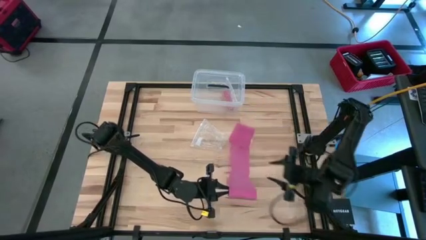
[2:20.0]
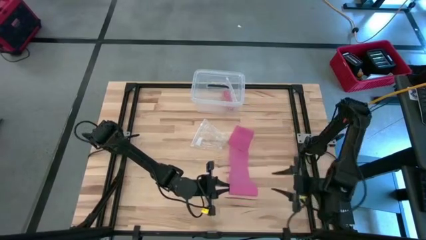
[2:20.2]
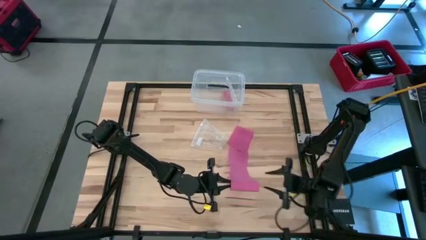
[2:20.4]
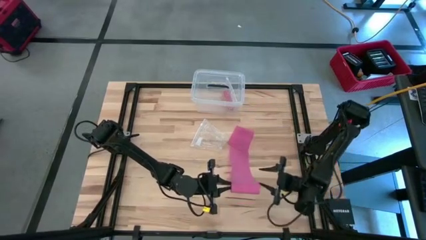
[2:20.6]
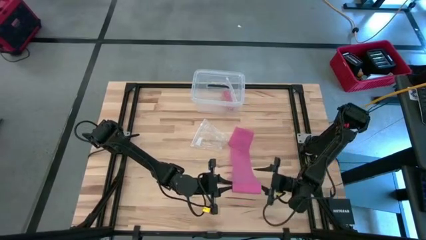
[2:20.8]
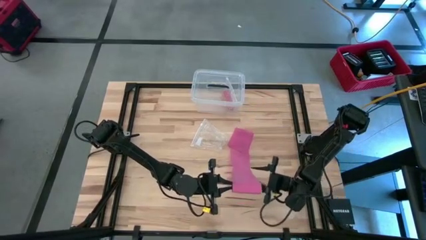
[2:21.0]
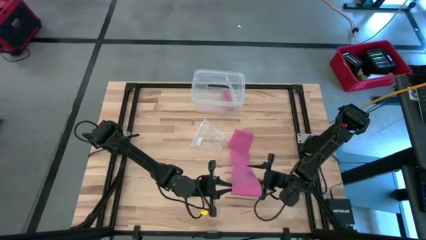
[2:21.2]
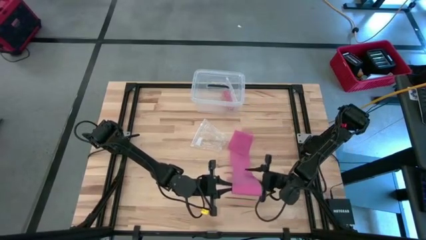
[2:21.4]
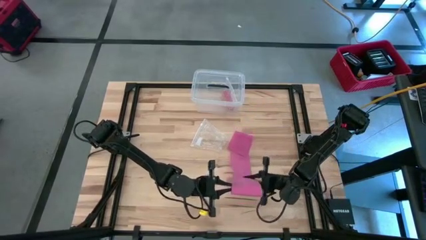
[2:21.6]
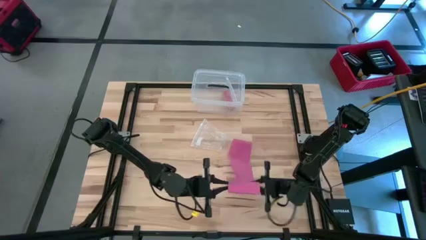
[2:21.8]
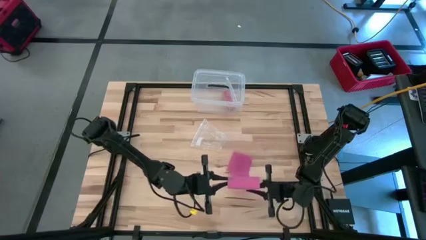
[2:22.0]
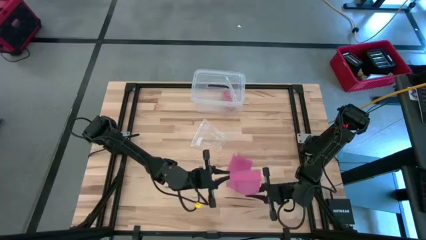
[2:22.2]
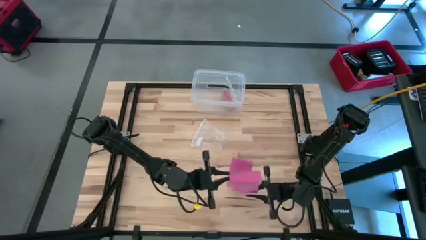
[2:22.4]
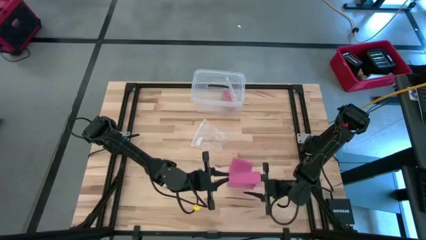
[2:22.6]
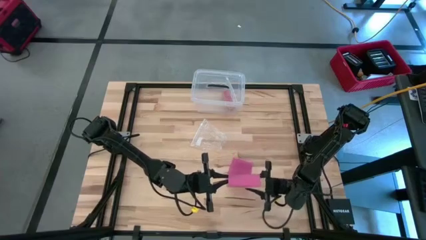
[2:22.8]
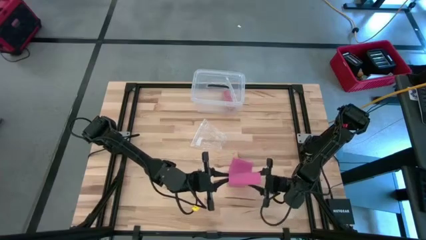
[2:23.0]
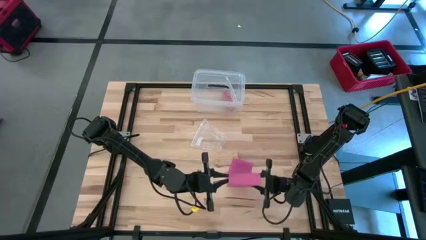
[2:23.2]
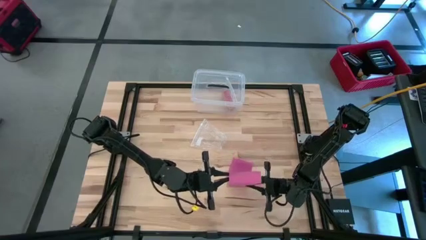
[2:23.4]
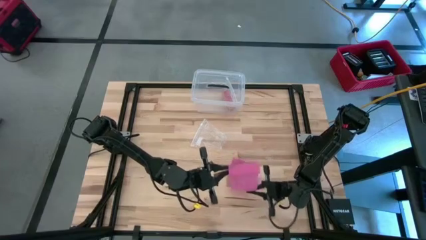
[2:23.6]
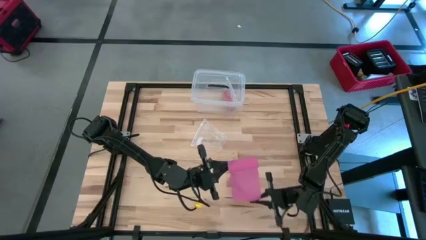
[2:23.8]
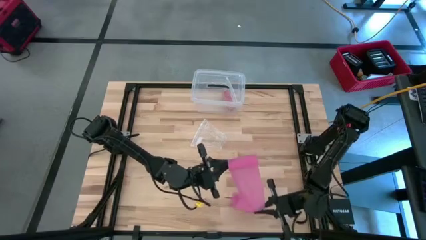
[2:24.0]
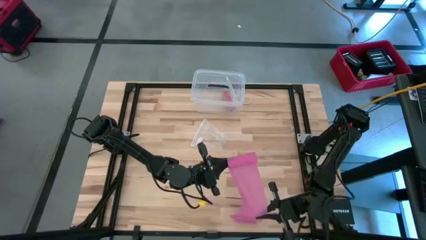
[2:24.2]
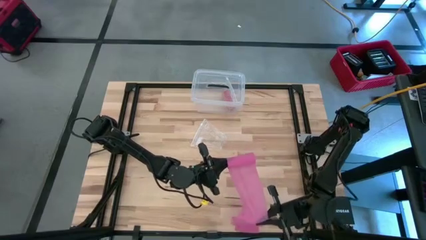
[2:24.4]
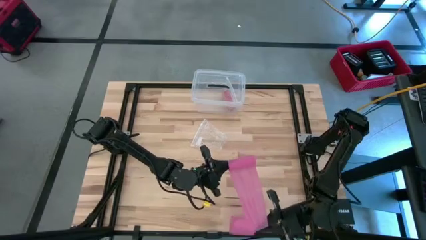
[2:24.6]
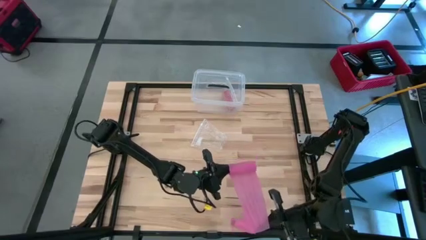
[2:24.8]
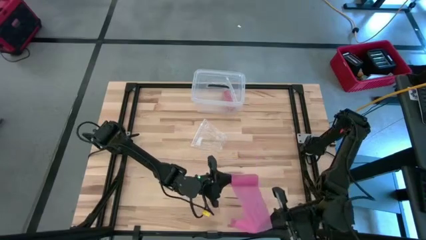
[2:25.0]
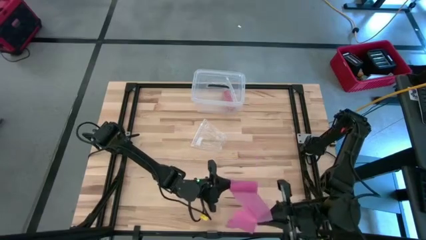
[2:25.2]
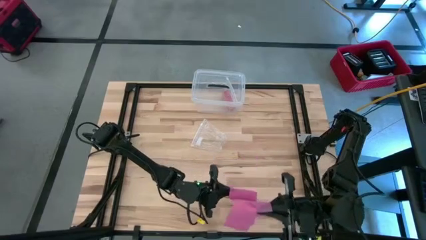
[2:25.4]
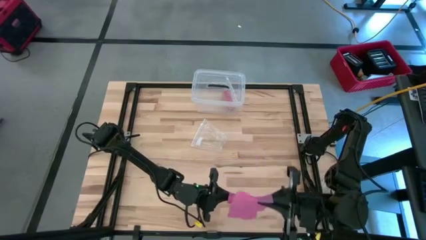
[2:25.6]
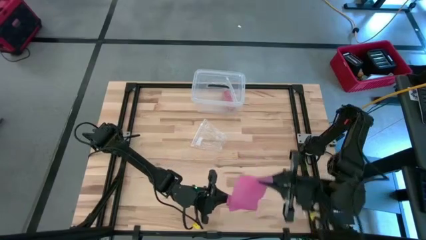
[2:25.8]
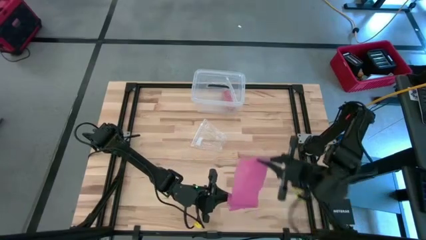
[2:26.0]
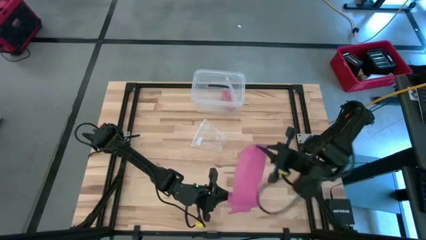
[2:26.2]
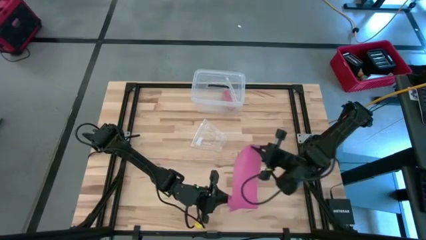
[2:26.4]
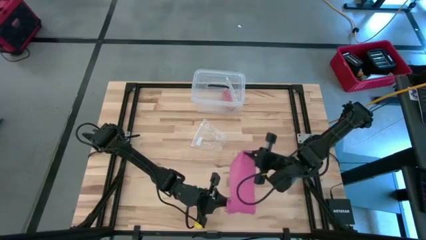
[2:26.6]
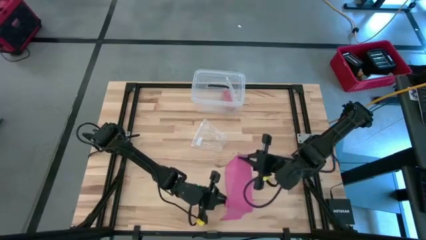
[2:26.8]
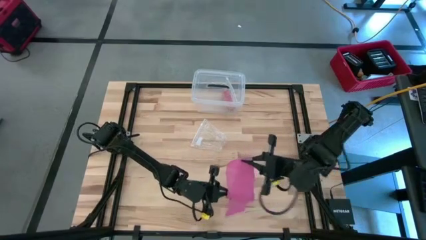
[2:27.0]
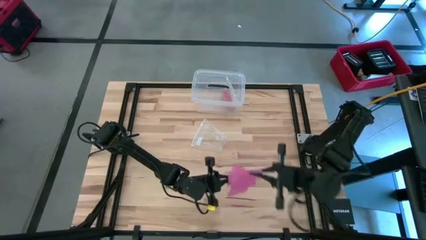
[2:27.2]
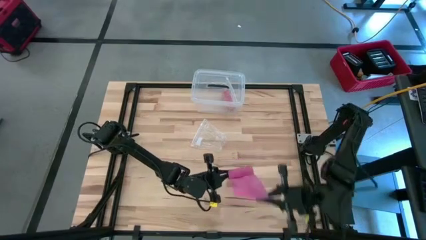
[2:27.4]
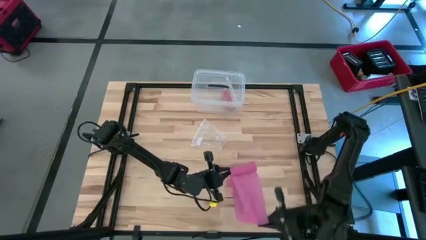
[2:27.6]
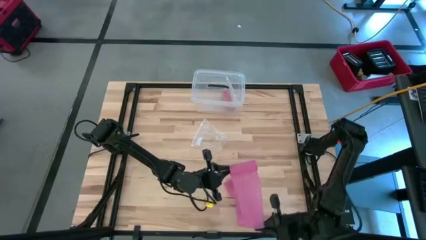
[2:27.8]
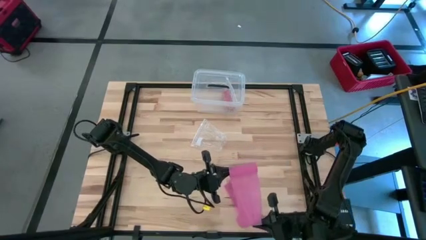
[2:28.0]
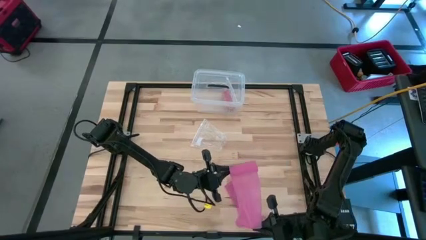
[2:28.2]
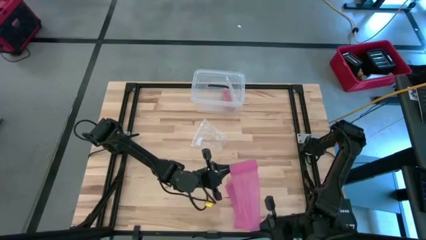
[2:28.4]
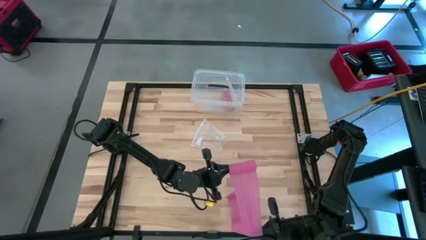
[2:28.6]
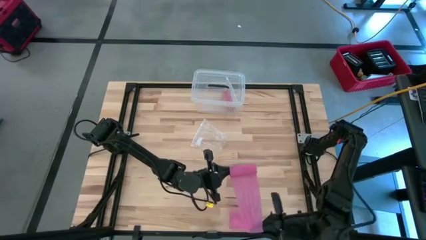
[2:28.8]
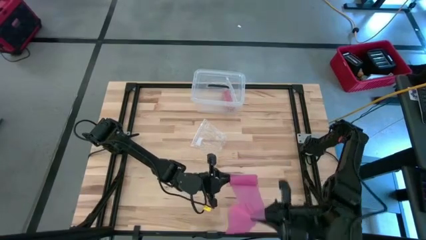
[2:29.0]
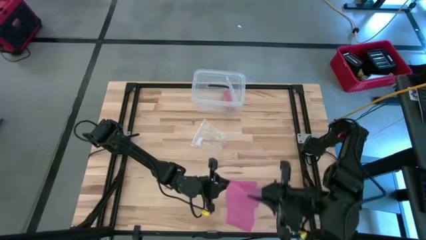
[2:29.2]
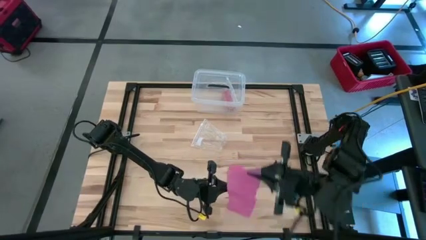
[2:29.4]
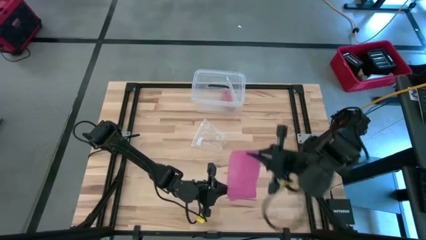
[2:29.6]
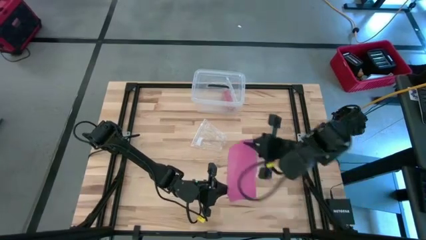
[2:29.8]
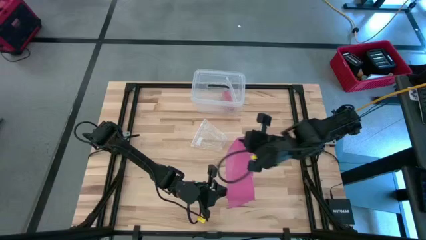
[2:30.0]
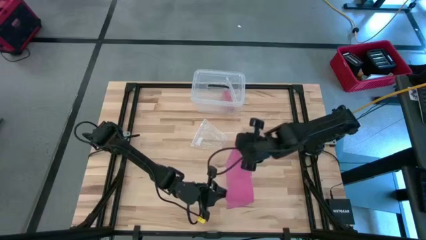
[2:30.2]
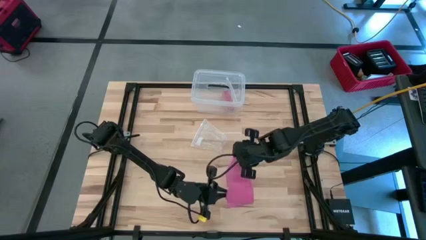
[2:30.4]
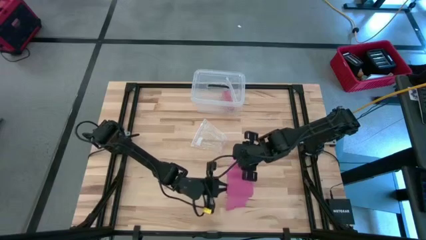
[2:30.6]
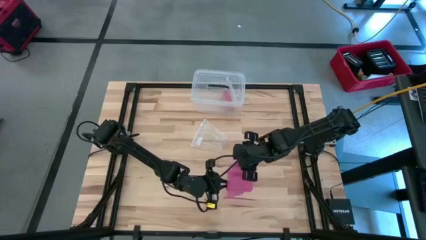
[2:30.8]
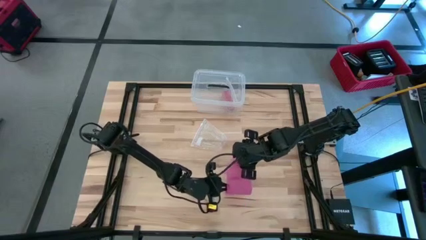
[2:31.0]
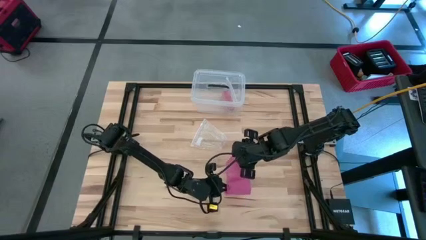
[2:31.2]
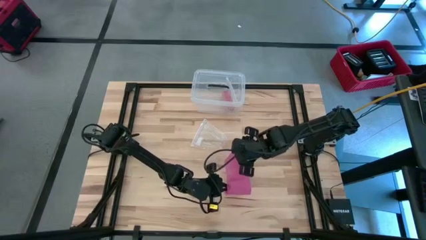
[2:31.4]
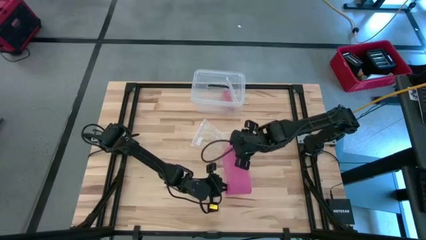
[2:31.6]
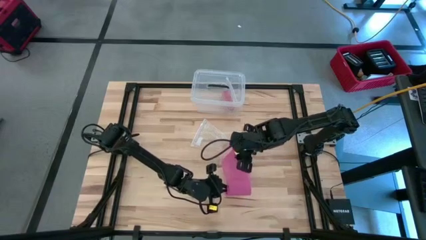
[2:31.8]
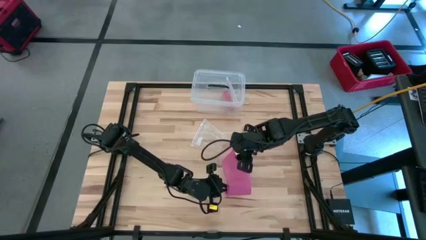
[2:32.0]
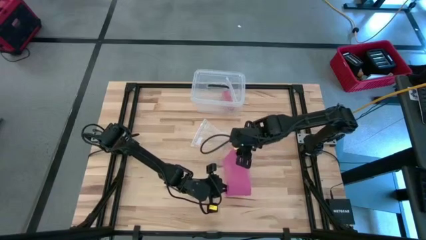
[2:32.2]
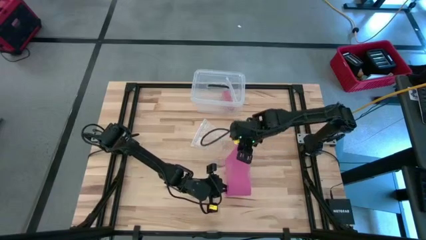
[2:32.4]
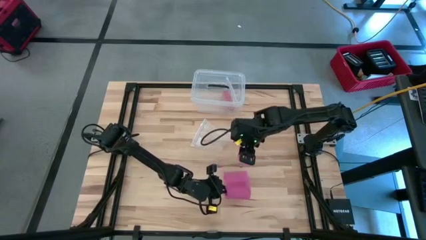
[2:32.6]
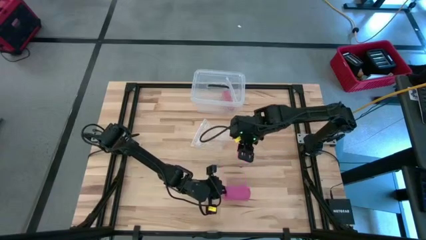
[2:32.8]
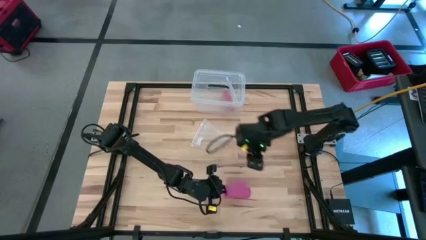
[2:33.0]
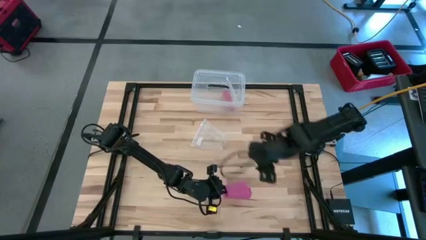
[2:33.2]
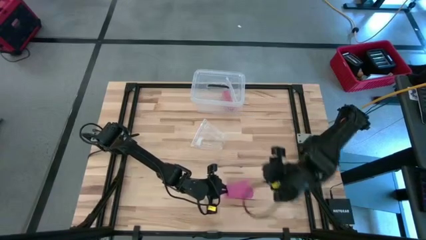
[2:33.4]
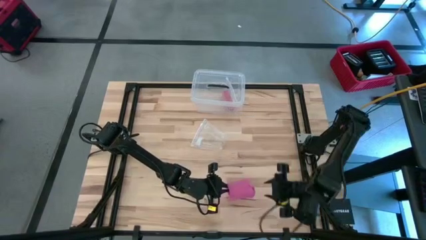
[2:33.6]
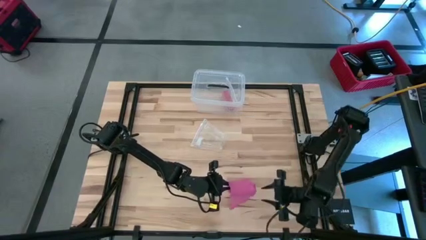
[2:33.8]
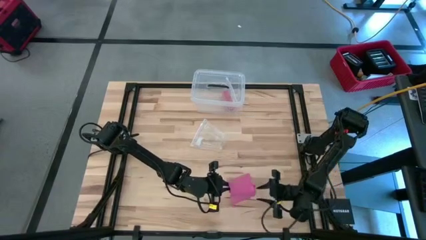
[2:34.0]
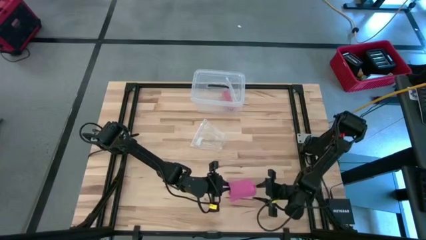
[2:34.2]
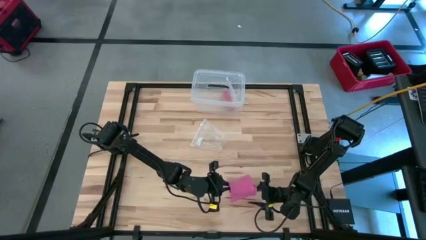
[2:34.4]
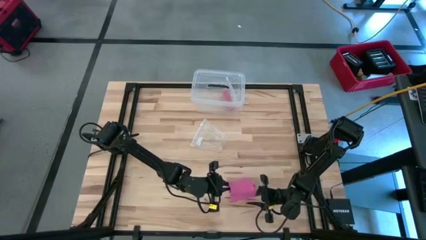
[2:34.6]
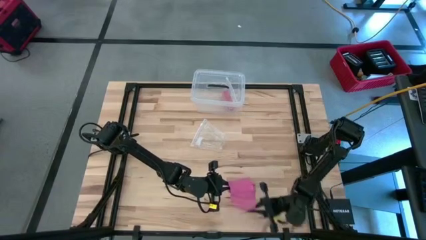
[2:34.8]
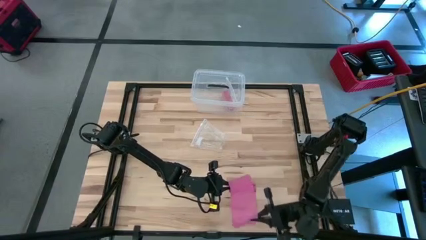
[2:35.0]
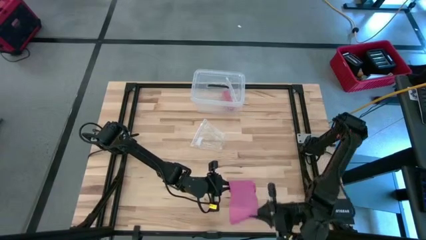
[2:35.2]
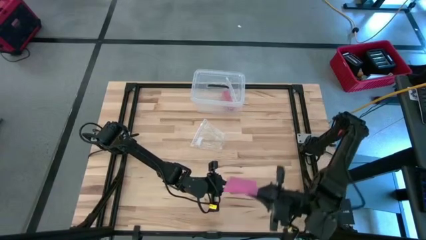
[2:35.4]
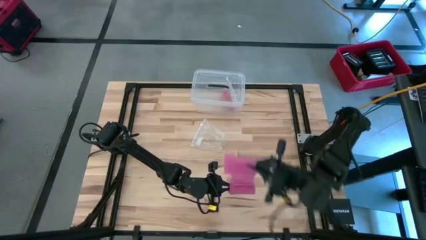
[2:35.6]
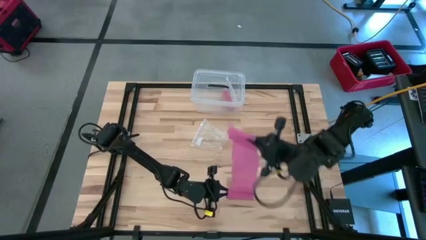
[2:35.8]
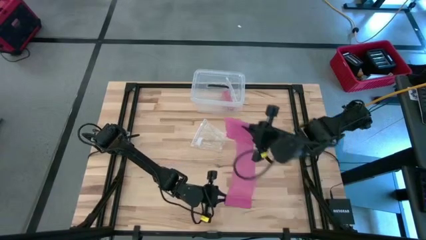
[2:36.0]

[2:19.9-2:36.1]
Task: Roll bandage
Roll the pink bandage
